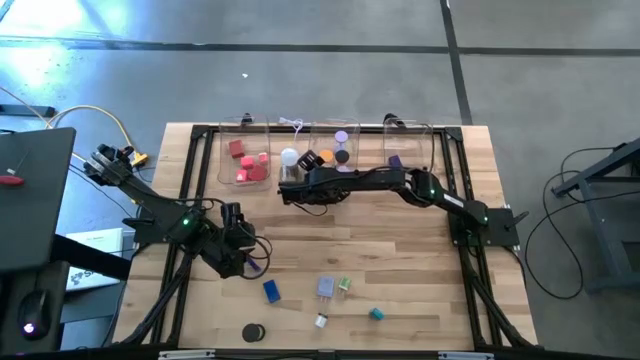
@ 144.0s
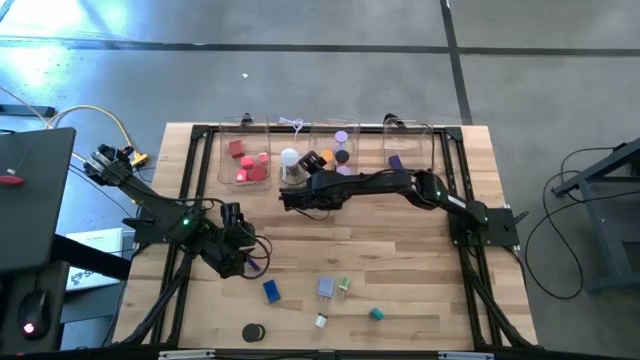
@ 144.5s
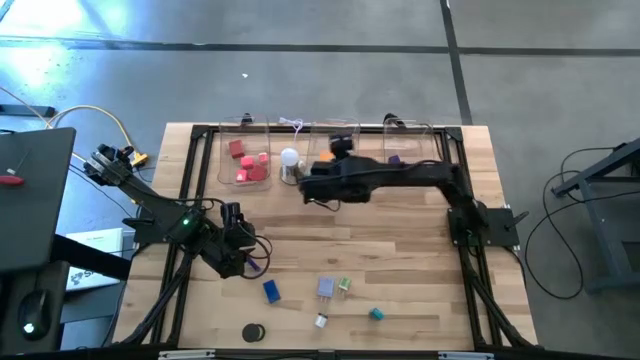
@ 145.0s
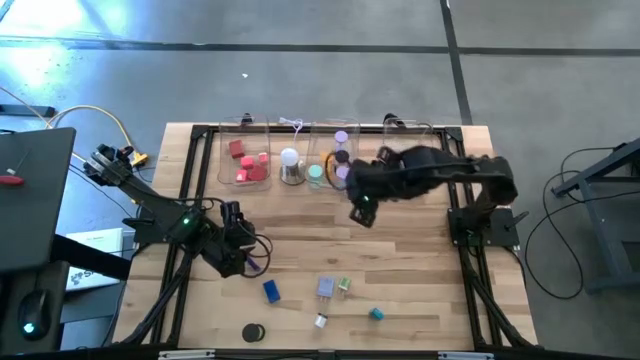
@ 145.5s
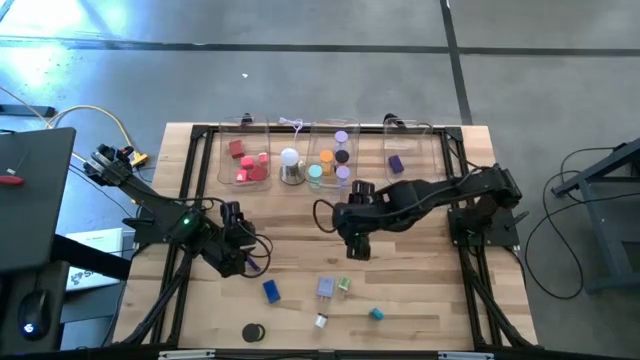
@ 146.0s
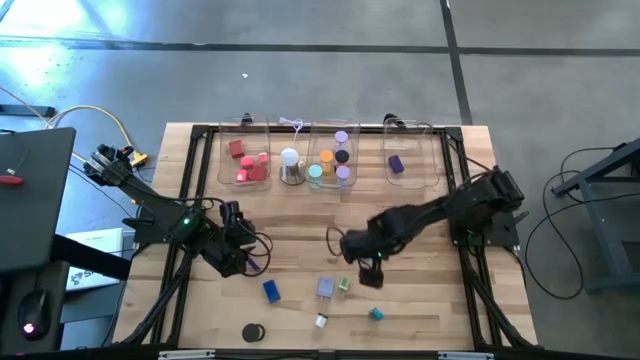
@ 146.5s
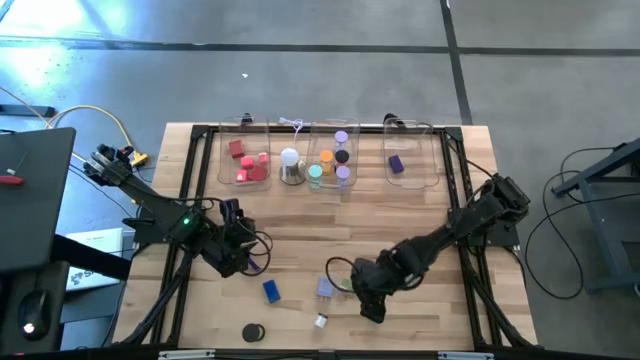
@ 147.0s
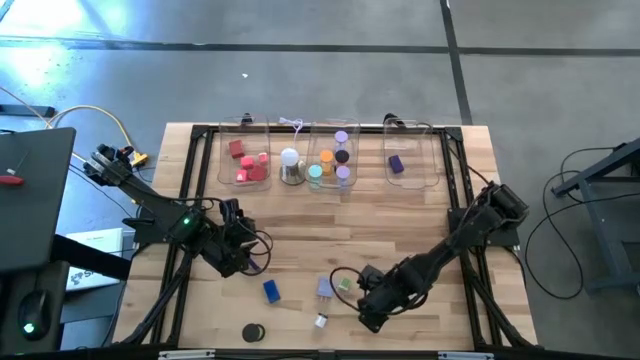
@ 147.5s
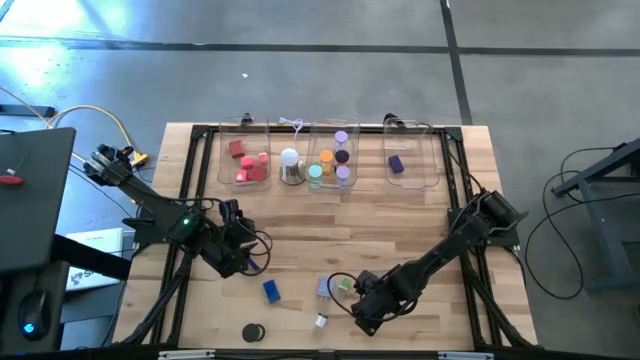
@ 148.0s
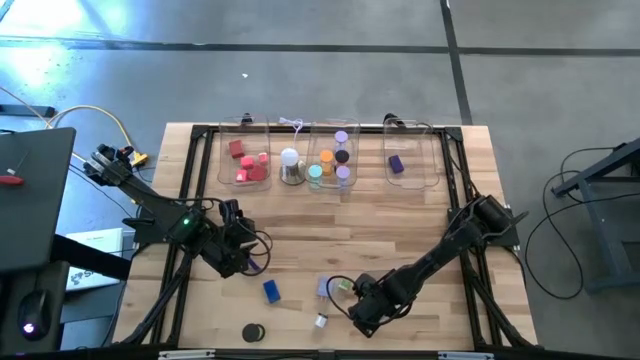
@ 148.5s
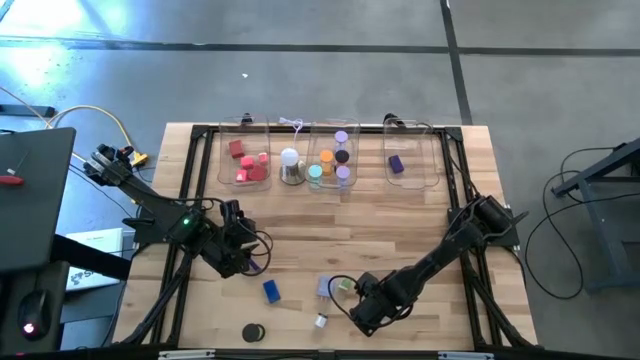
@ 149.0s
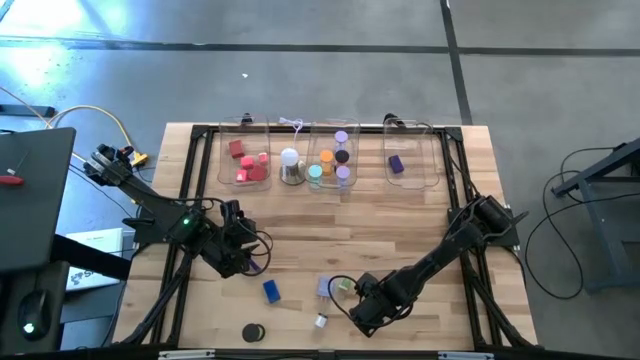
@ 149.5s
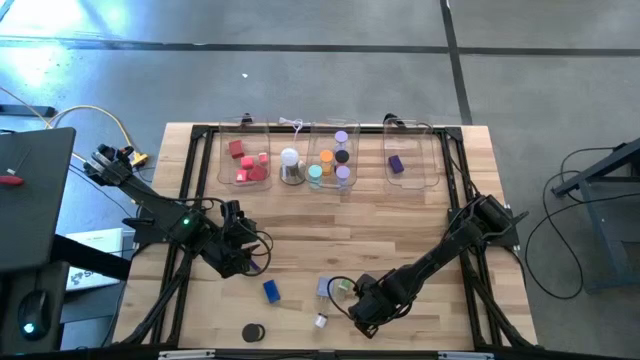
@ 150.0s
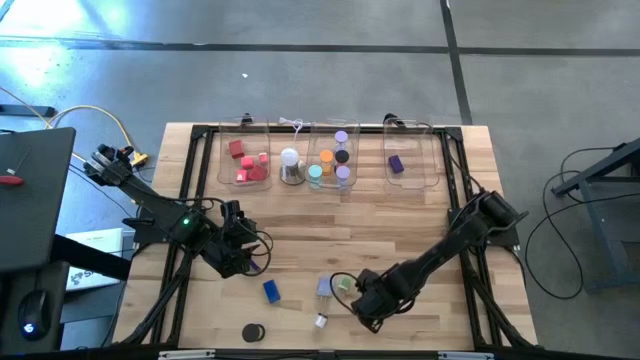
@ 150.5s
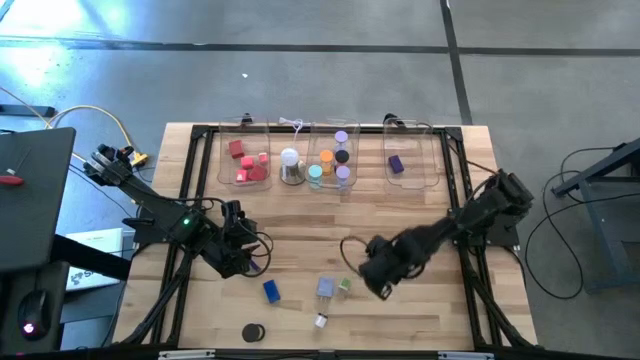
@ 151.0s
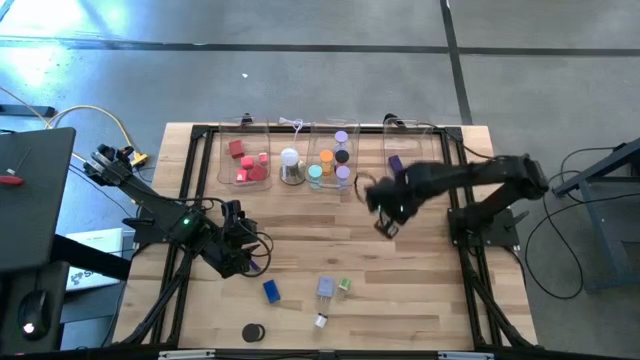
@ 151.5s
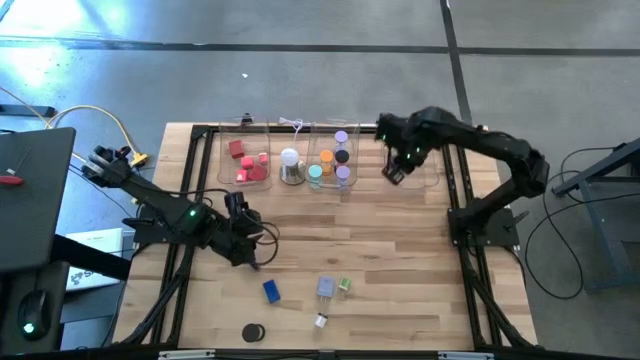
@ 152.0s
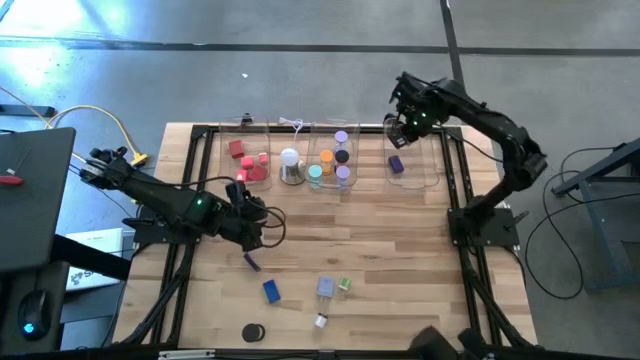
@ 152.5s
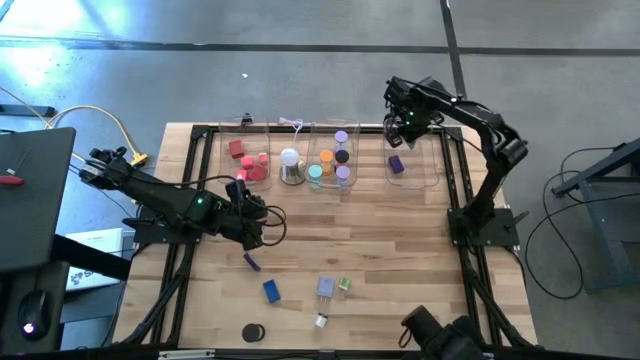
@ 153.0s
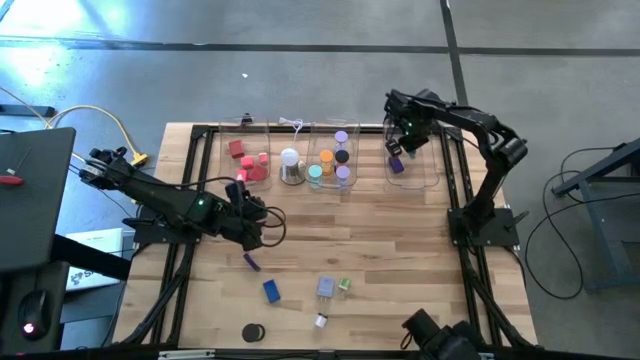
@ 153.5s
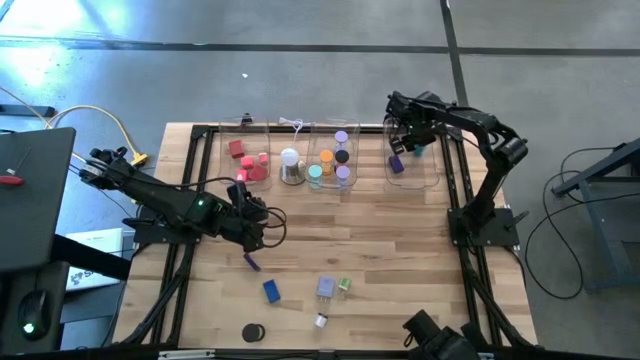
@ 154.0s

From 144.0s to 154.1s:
Task: Pick & Place Office items
Put the light blue digital clock into the right transparent bin

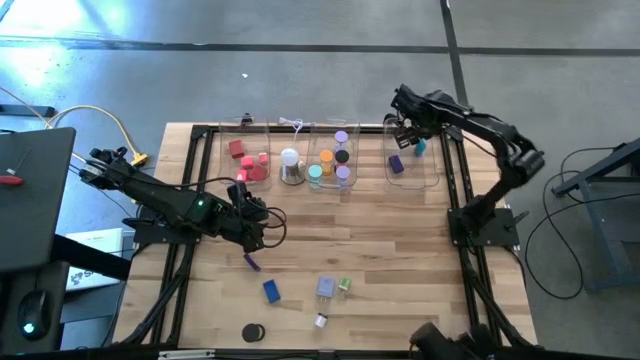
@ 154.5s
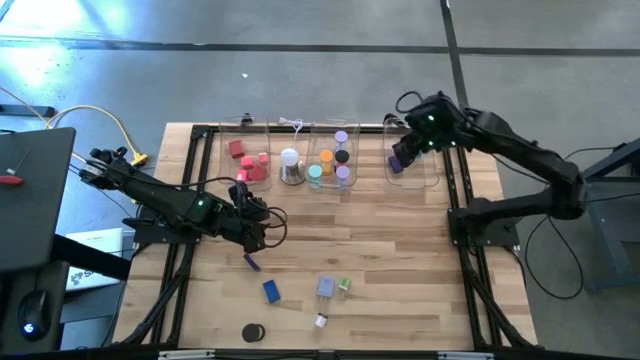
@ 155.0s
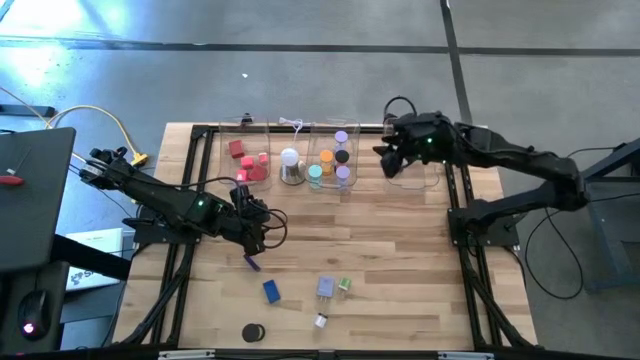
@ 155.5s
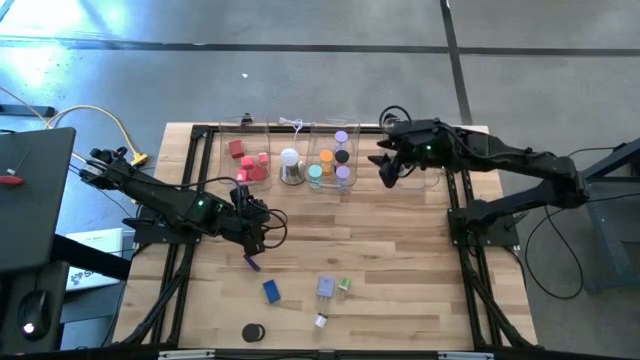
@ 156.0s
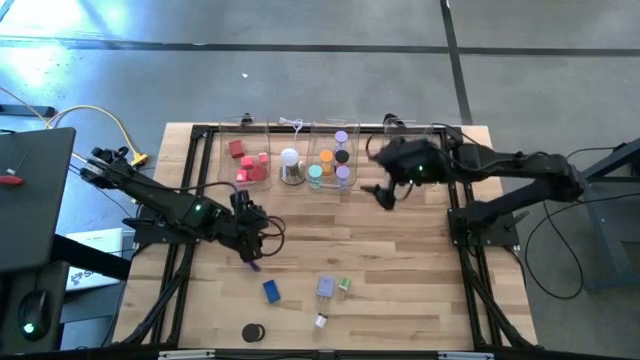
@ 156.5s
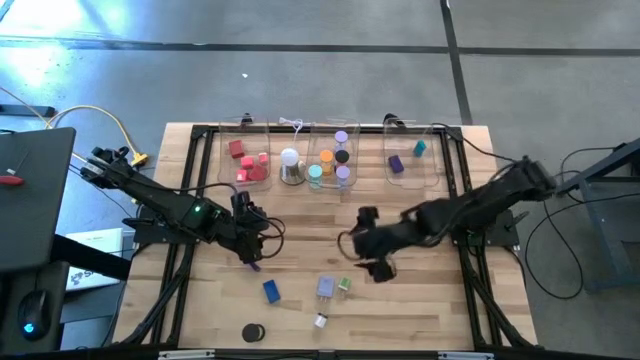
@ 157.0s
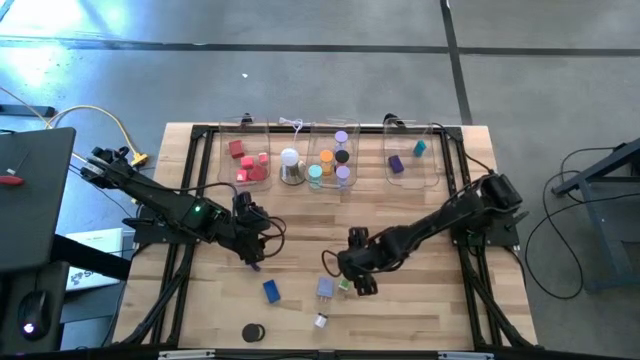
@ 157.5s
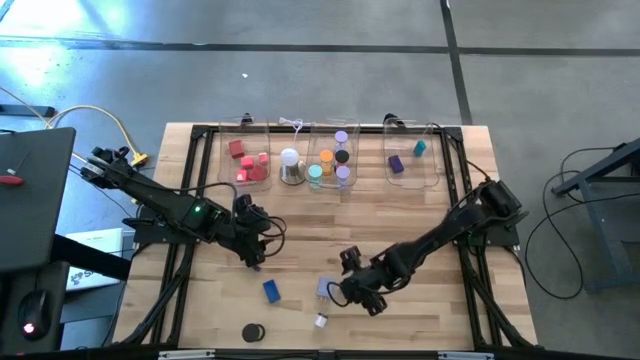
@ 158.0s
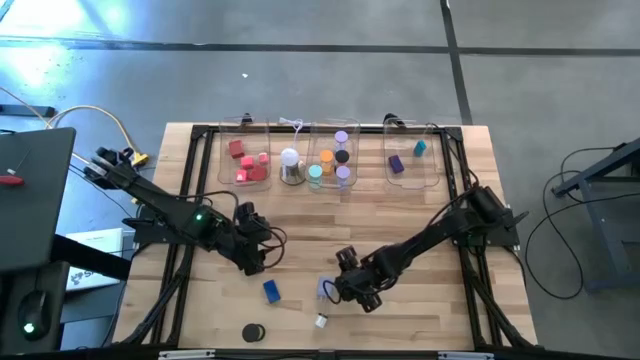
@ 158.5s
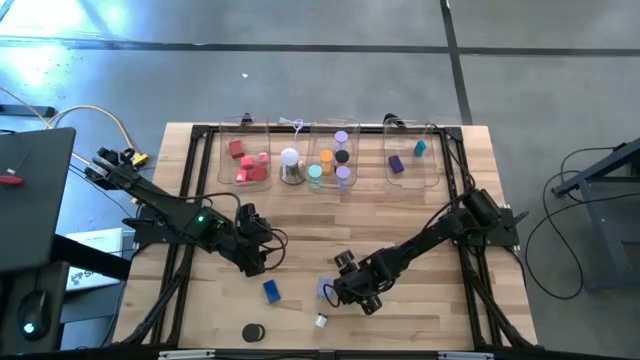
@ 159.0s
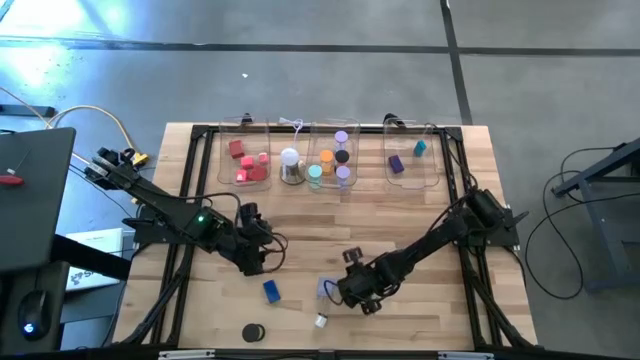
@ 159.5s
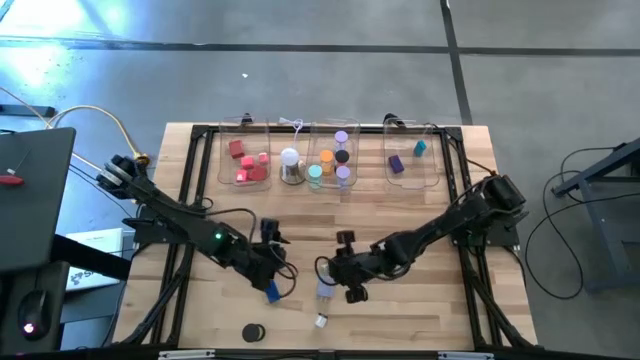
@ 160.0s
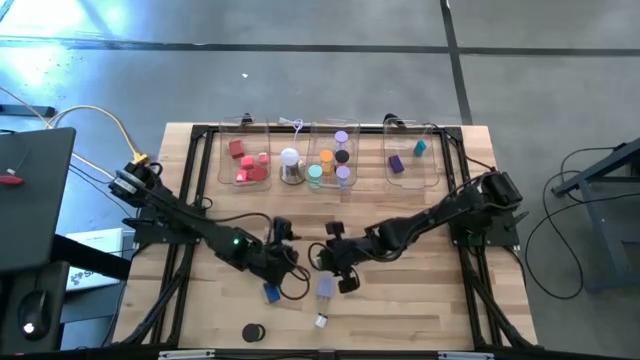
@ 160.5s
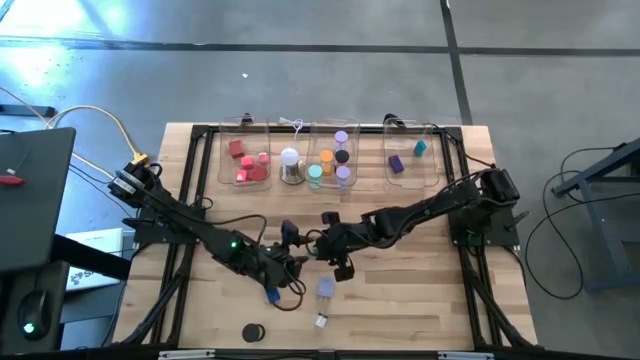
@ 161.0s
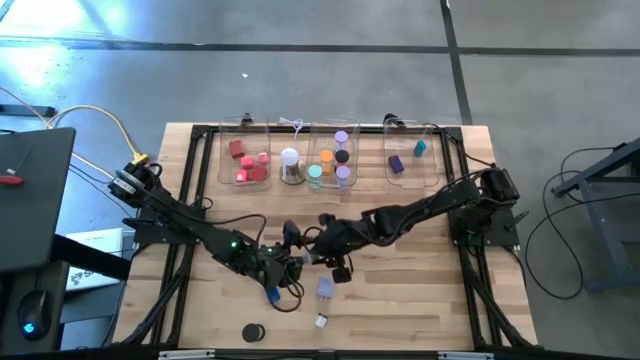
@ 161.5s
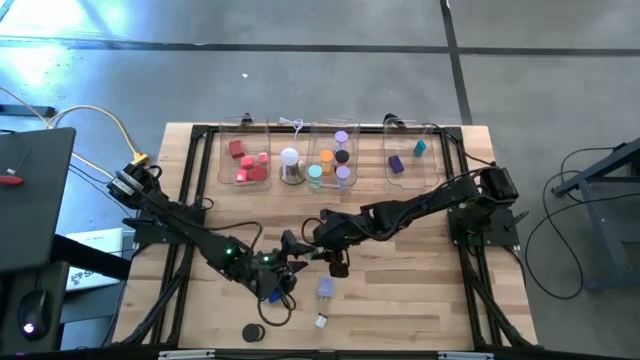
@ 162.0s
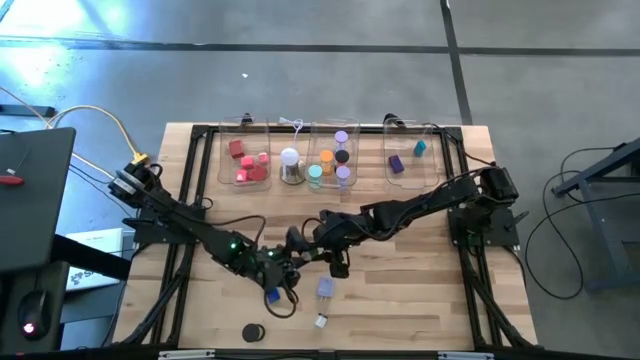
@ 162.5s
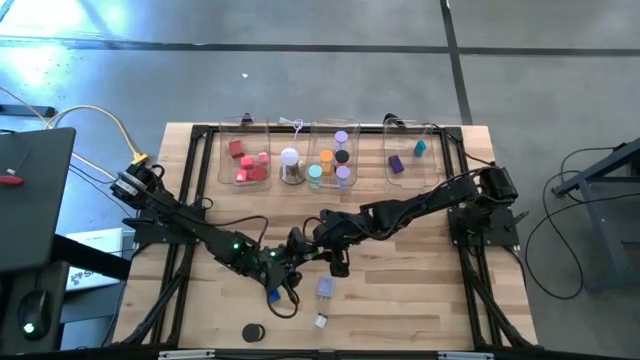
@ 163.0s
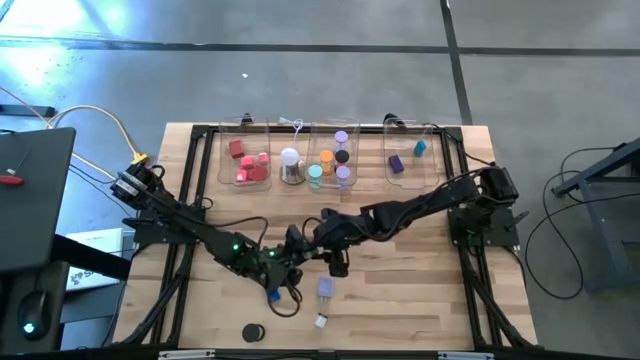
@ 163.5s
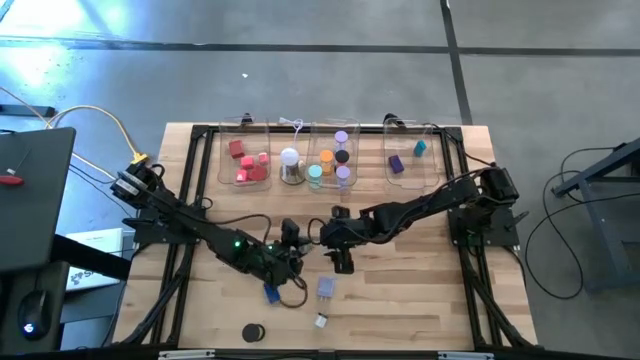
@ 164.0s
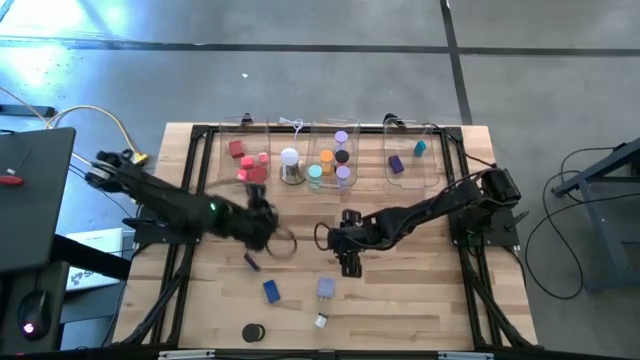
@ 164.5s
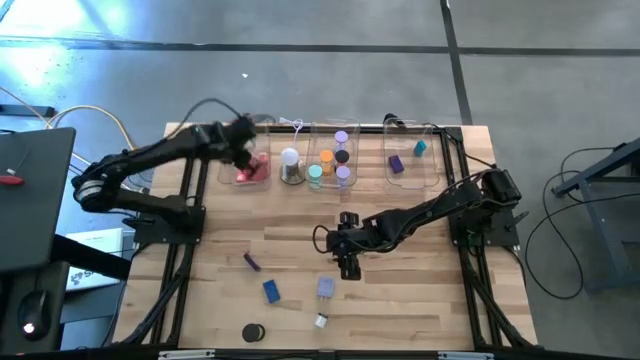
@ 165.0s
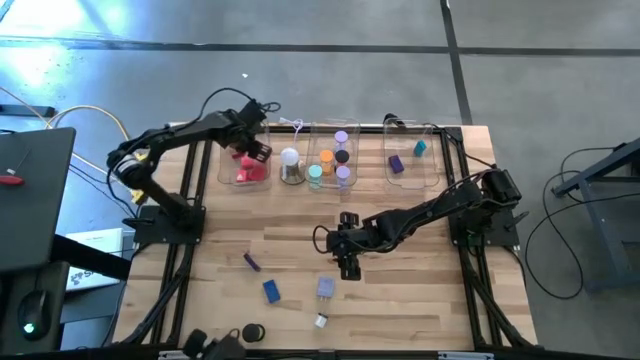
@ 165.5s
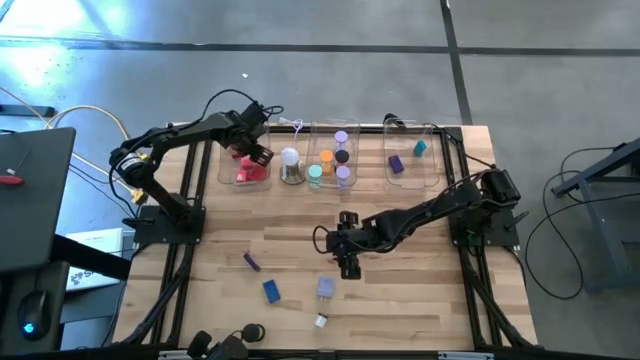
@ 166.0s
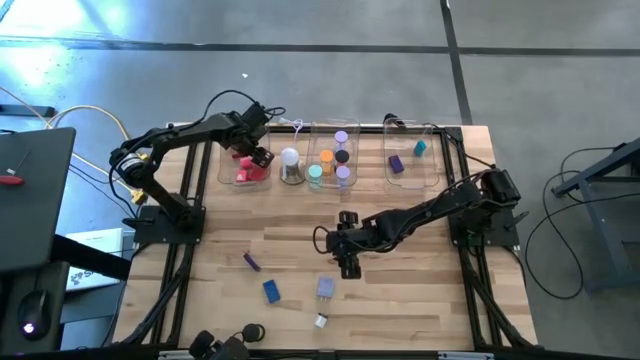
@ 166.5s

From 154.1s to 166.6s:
Put the green charger adapter into the left transparent bin
